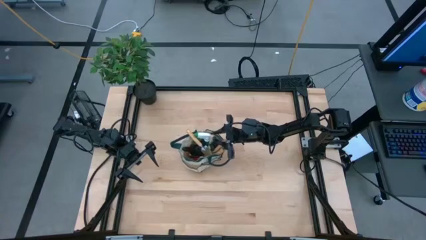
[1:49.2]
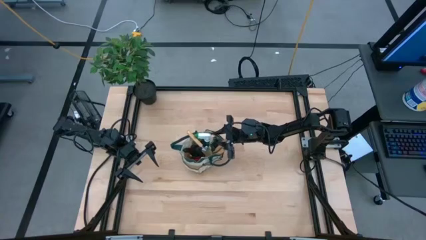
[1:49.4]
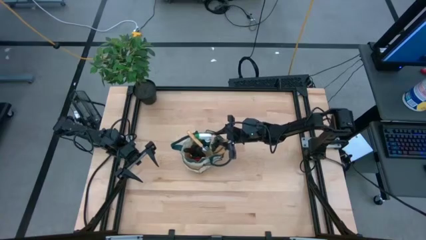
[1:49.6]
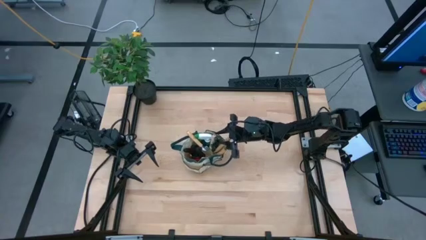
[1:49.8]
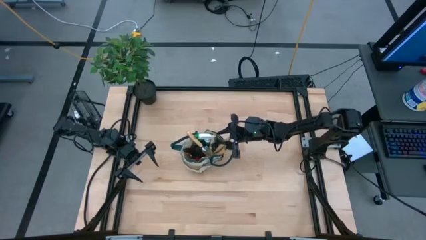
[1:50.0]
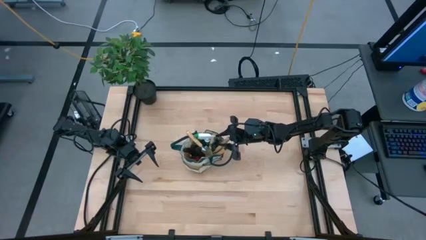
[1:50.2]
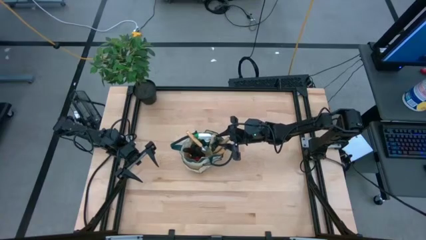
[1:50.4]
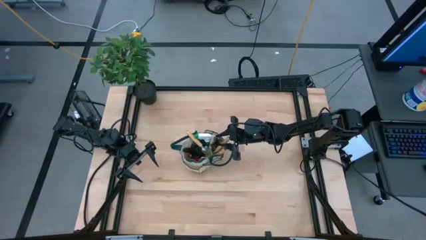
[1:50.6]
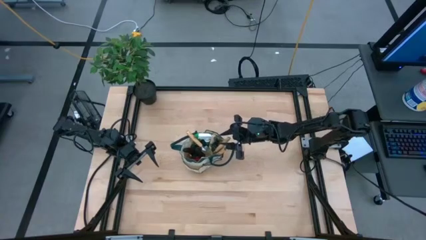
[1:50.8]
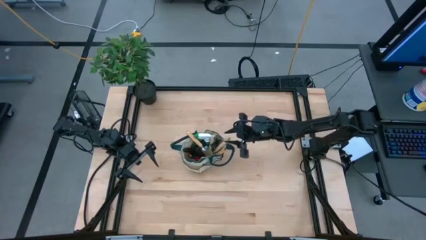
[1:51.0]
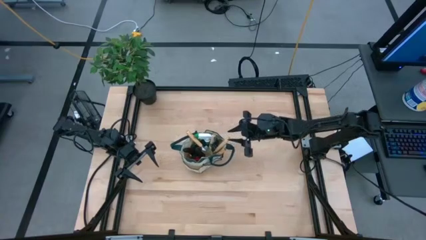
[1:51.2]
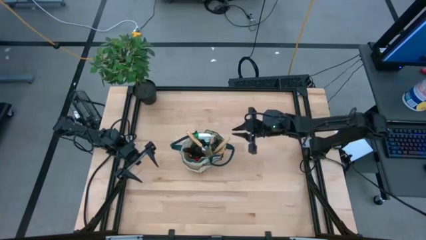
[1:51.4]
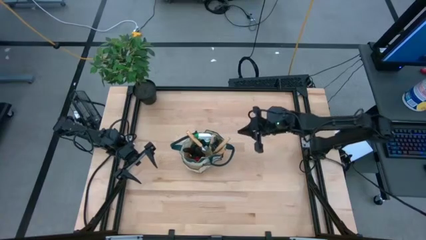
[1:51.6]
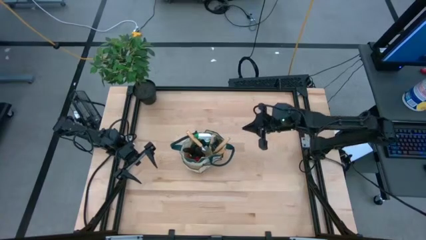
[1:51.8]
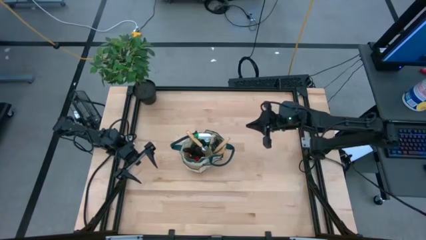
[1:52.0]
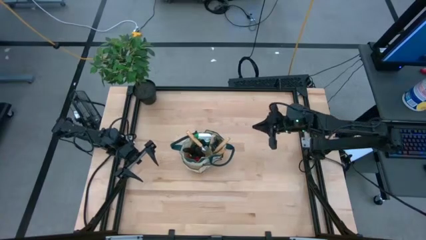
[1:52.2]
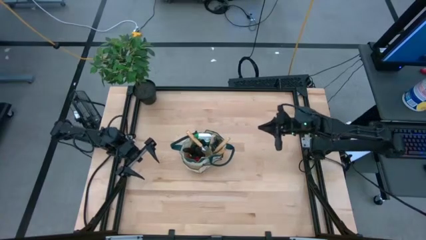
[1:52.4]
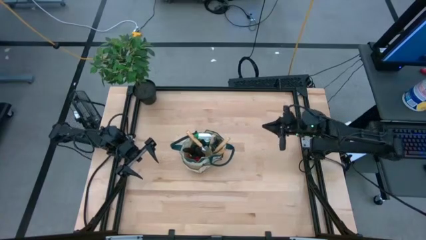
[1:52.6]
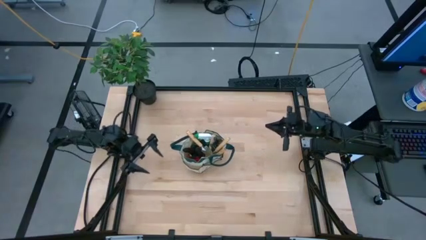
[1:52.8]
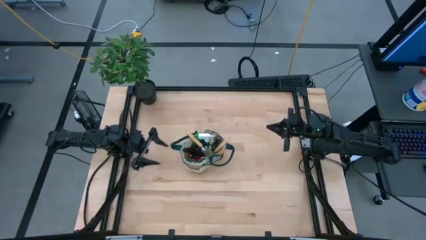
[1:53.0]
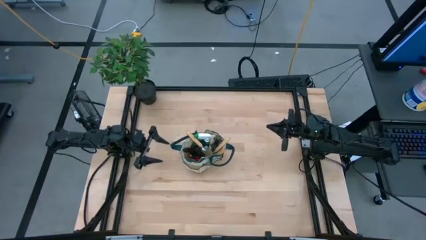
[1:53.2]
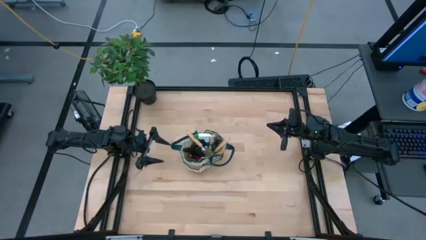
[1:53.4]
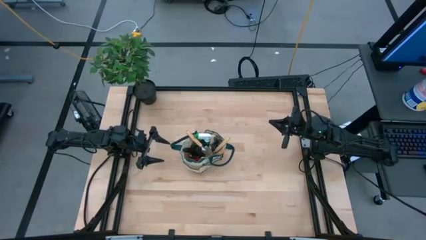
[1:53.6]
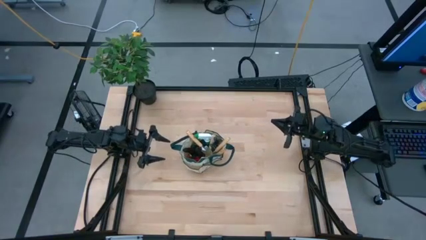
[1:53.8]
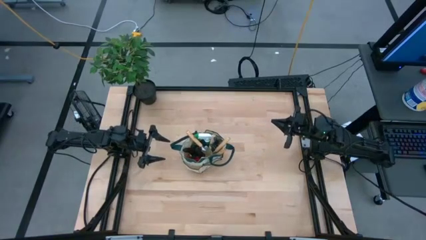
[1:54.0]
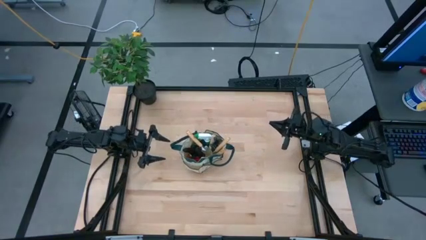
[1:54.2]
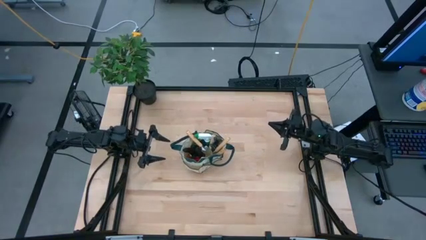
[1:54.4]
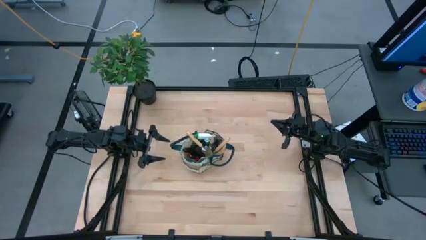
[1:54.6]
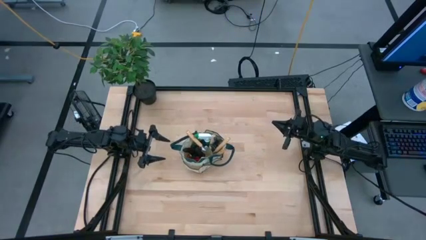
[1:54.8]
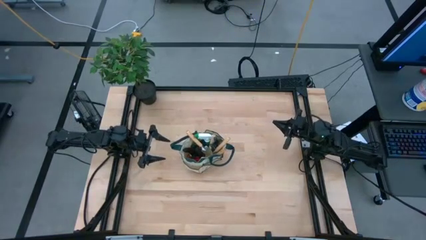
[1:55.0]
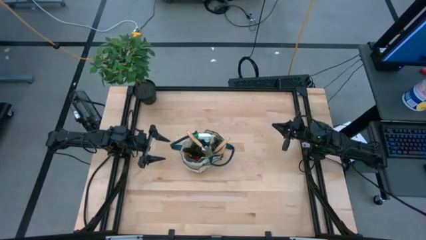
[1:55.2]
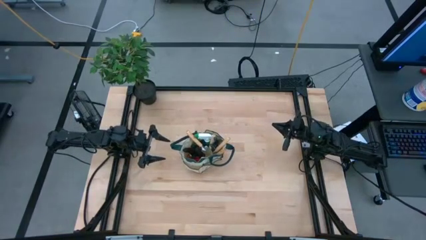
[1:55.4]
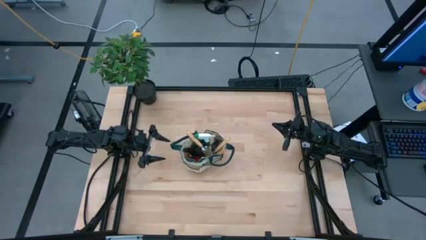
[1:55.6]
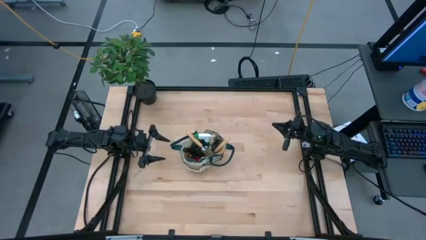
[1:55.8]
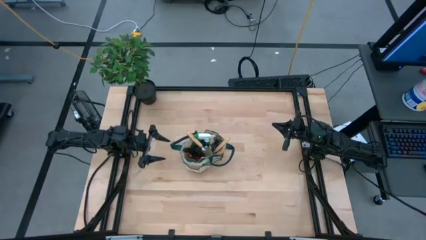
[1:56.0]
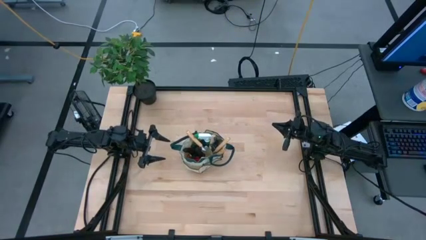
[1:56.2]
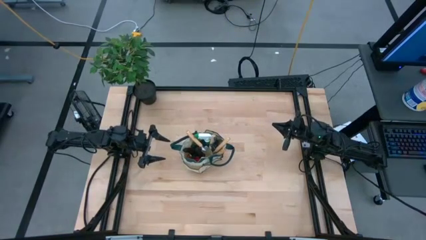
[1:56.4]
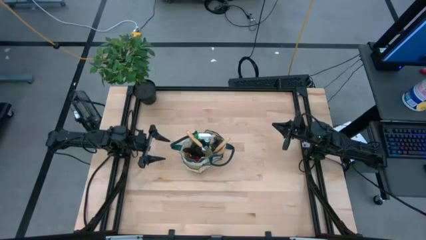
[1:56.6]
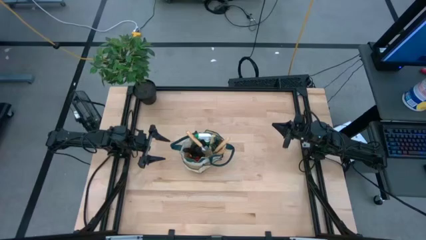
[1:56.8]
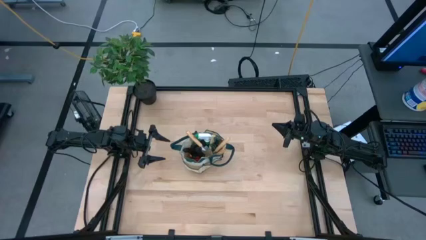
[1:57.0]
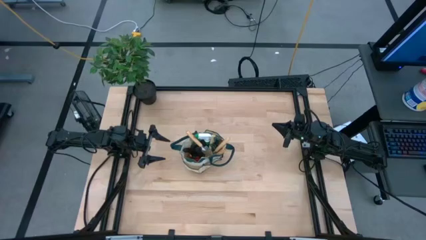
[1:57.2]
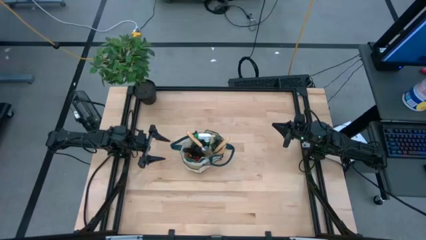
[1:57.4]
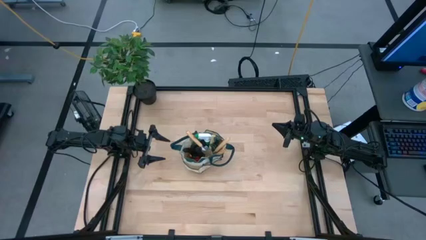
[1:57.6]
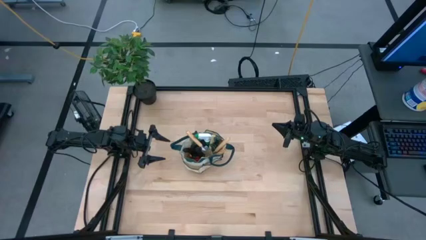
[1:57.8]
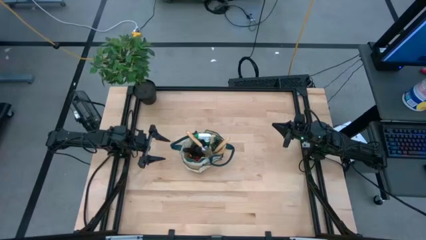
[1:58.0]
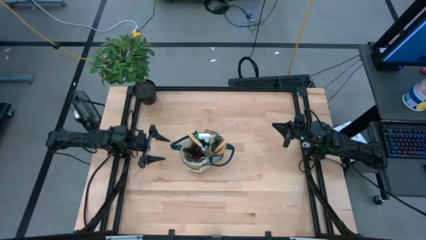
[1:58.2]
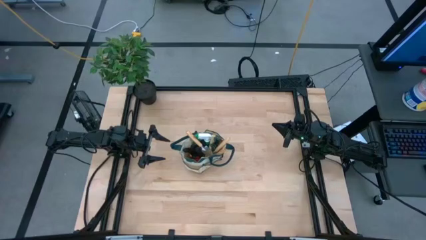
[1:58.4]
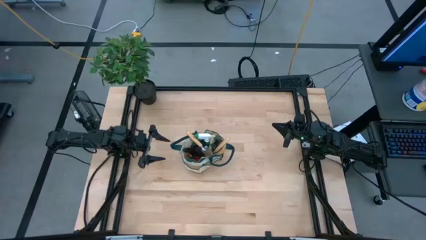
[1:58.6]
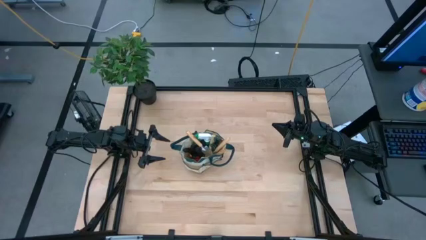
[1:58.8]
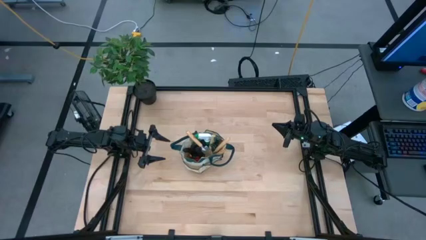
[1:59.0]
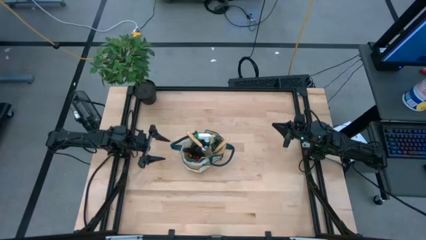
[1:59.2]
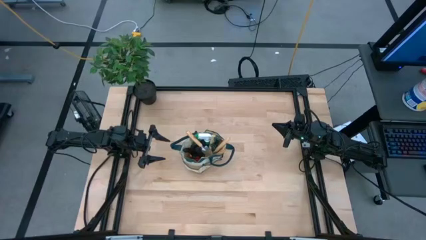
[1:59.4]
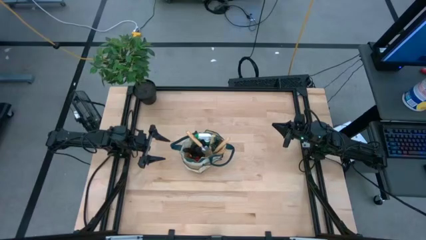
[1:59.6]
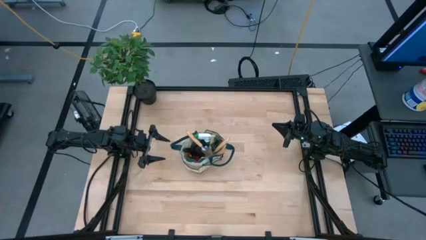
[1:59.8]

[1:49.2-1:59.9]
Task: Pick & Place Garden tools in Gardening bag
Return to Home Position

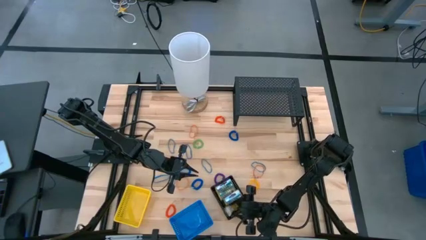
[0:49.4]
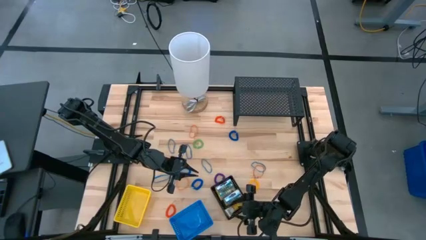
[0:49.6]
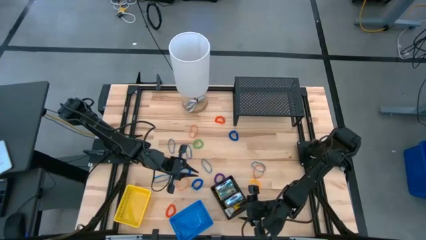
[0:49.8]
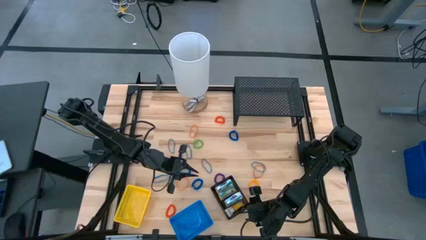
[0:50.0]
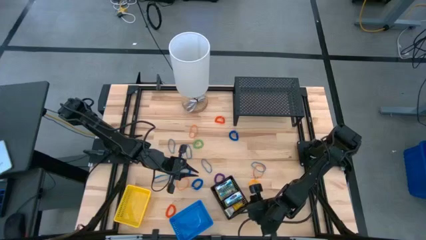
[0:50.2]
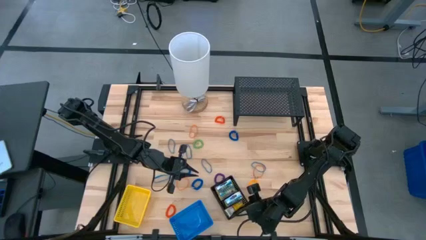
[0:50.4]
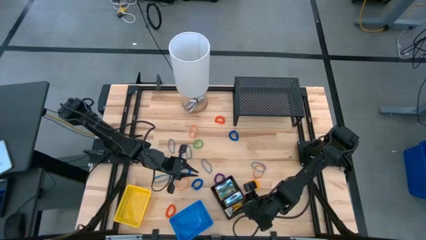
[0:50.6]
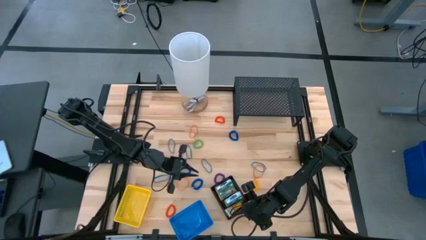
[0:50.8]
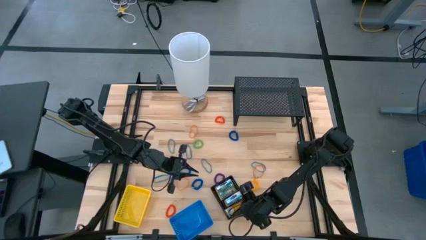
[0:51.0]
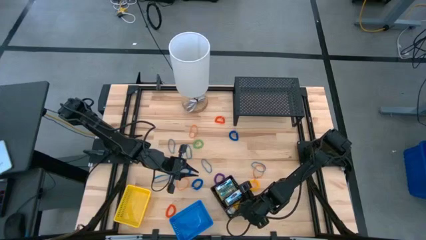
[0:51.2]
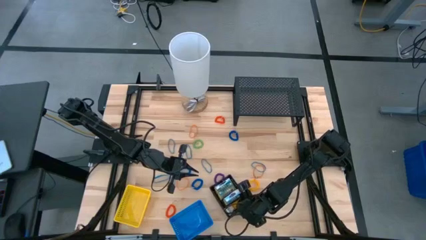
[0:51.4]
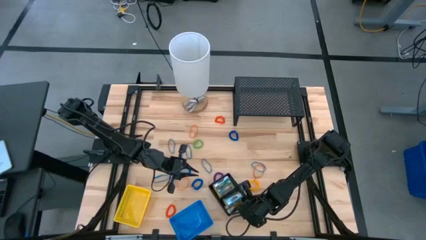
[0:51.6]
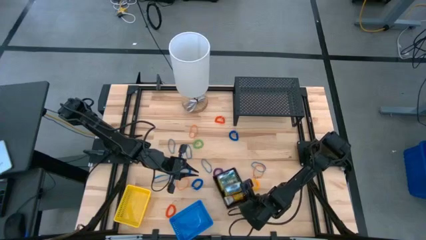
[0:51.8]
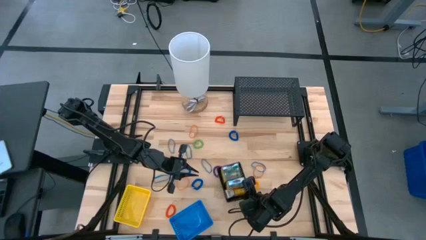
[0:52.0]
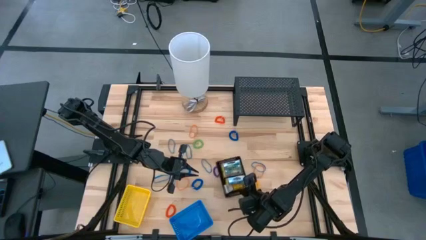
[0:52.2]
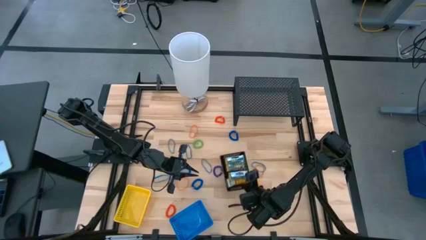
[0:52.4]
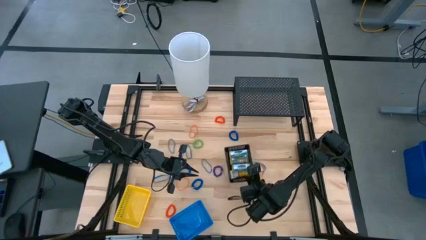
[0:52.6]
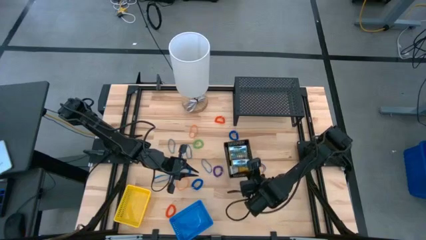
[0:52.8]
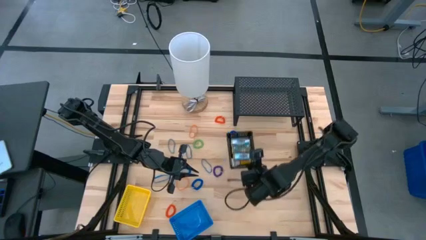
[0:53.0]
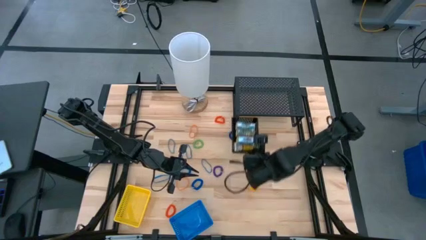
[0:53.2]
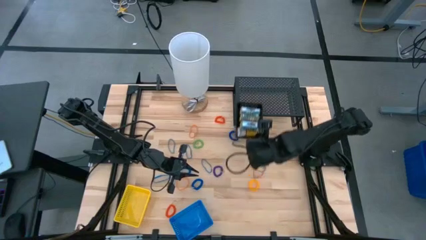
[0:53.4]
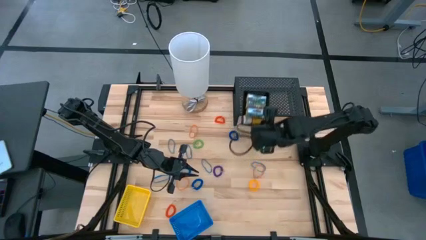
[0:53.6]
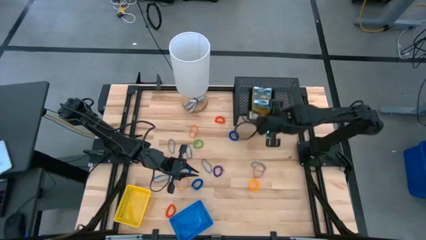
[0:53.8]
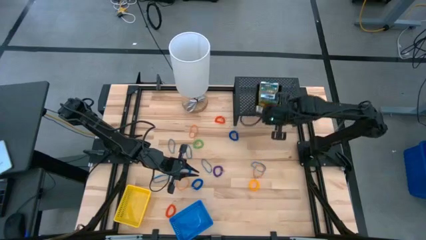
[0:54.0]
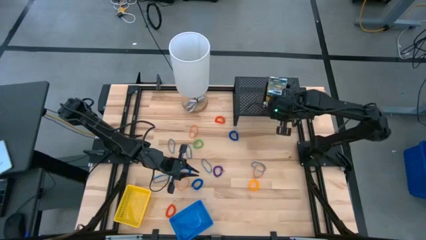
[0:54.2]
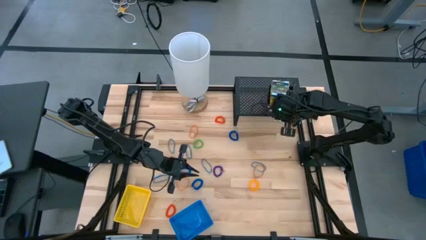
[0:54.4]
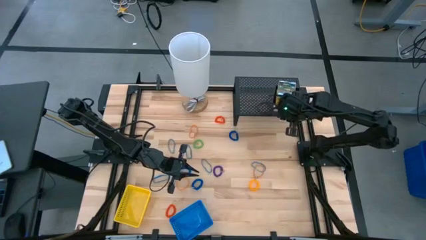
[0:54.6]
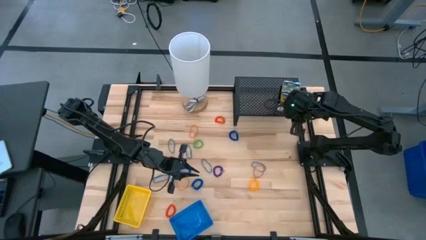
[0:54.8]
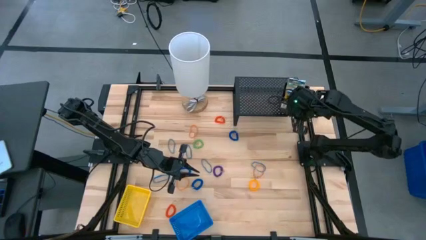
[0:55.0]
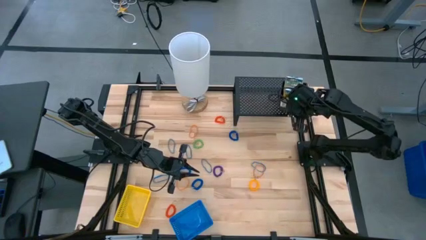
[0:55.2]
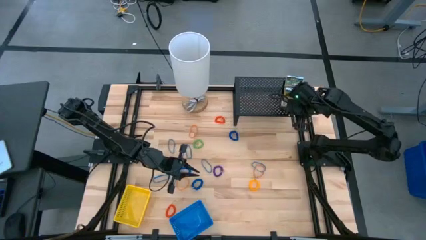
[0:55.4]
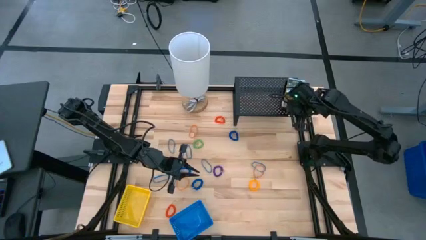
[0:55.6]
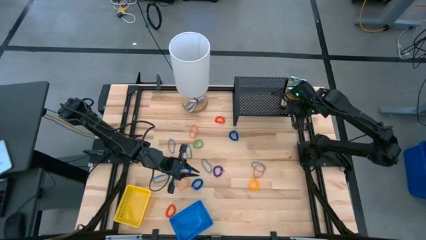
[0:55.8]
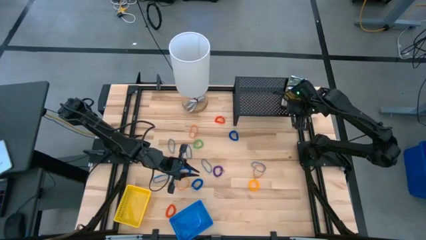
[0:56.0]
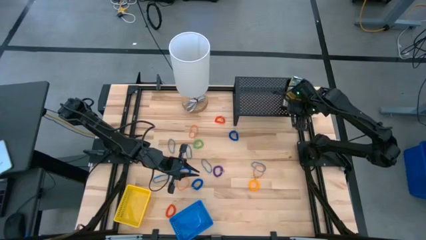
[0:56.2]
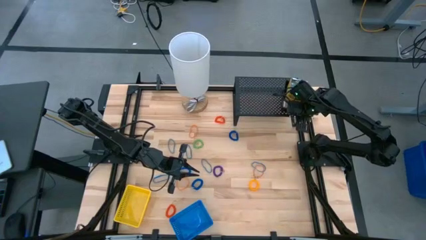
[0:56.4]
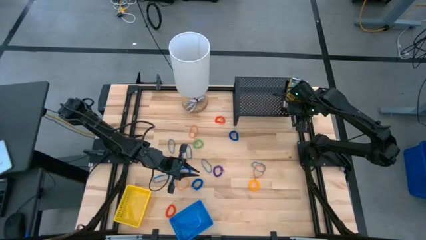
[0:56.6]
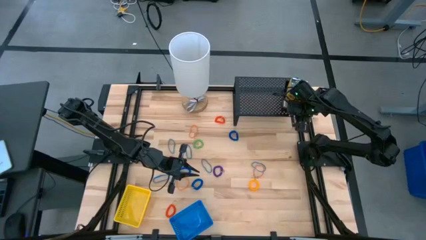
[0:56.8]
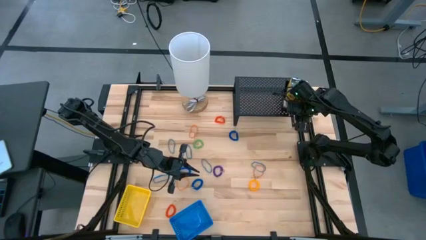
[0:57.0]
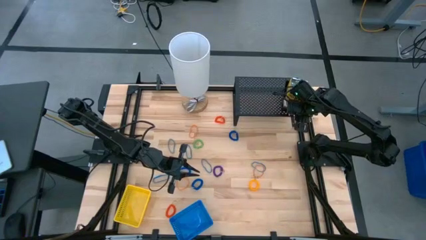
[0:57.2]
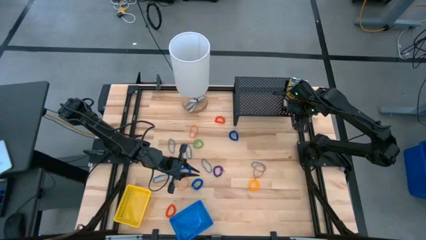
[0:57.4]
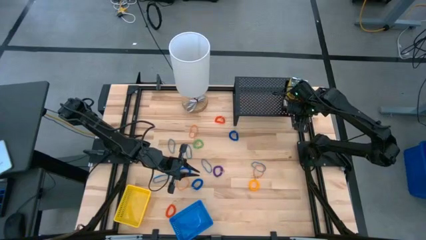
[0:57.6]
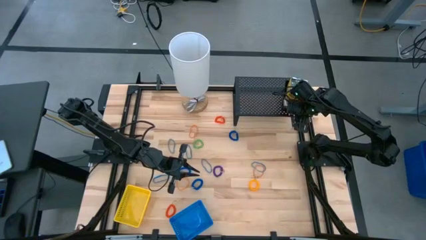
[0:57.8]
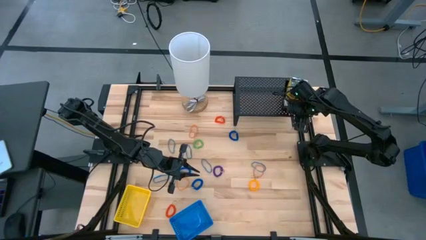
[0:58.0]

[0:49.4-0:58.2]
Task: Pick & Place Office Desk Supplies
Put the black bin on the shelf
